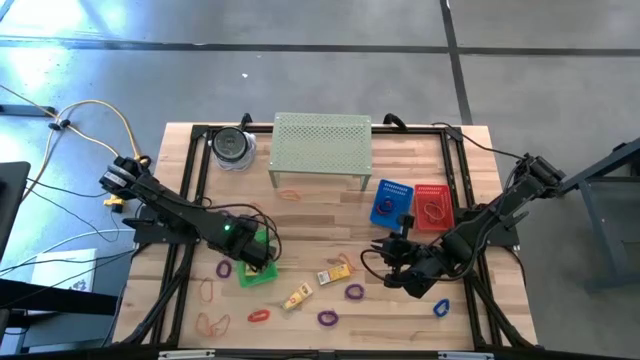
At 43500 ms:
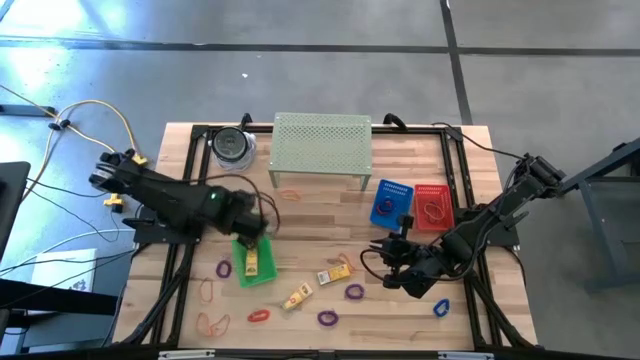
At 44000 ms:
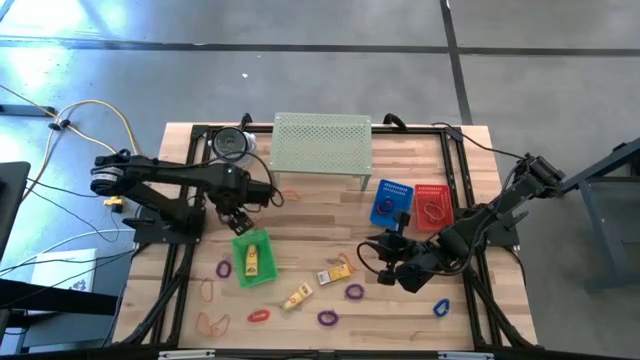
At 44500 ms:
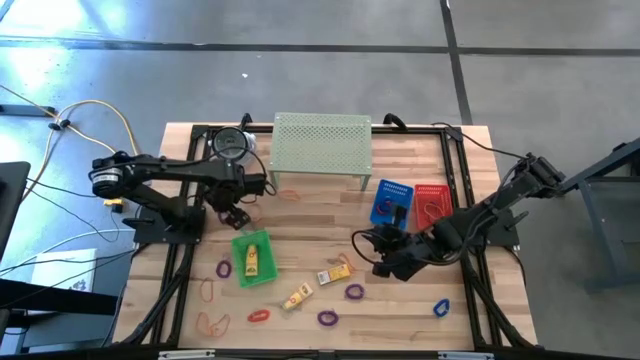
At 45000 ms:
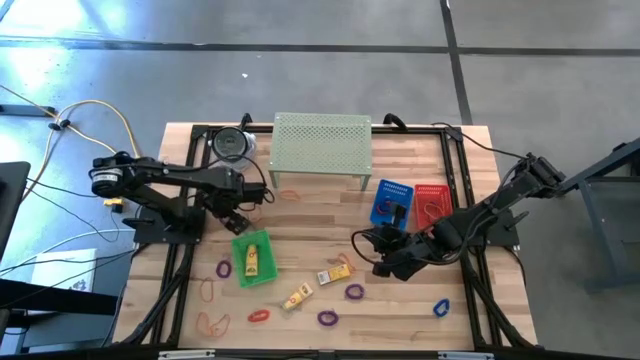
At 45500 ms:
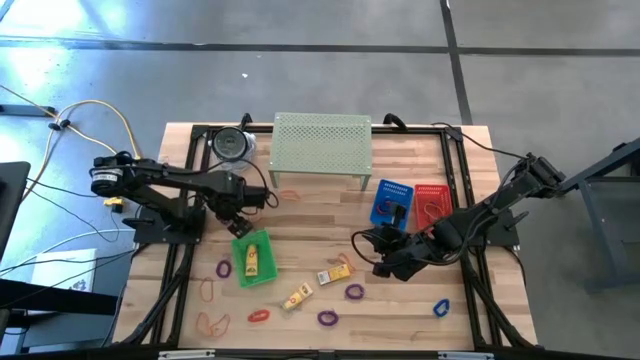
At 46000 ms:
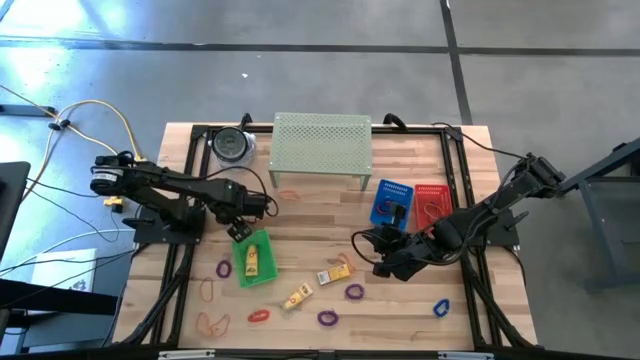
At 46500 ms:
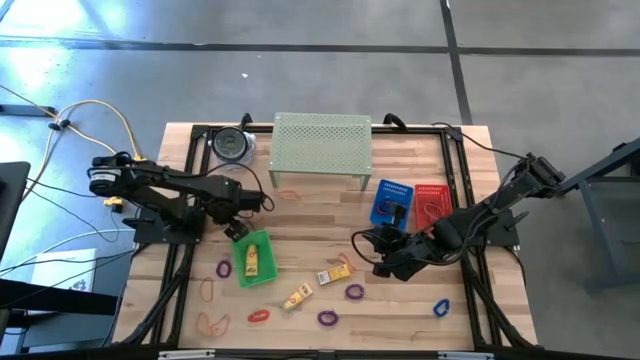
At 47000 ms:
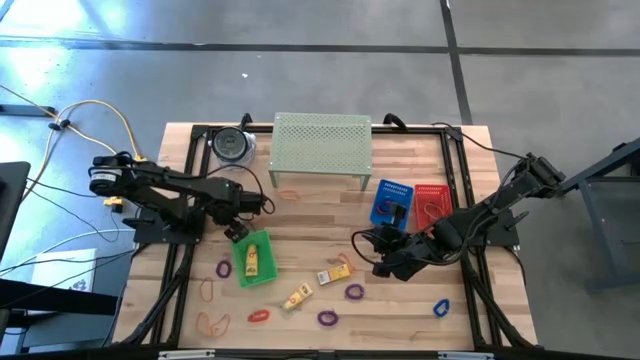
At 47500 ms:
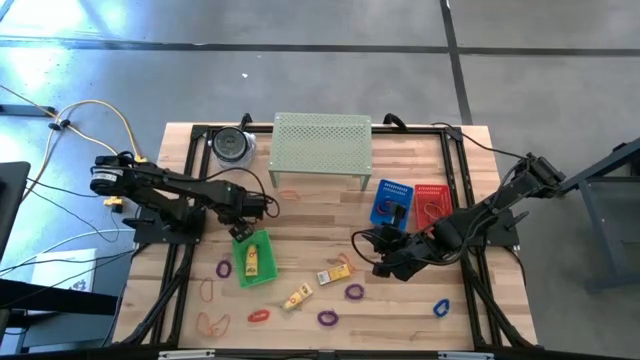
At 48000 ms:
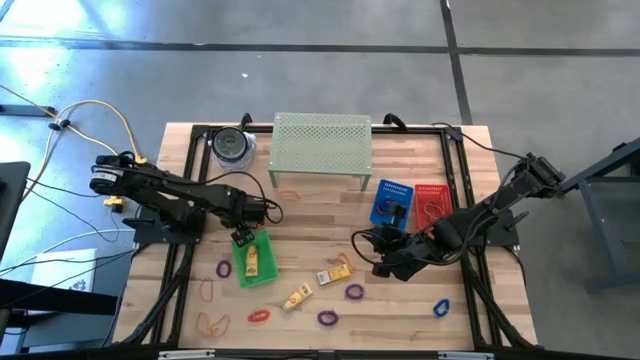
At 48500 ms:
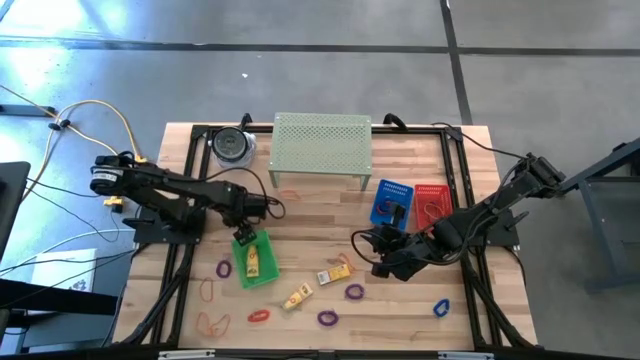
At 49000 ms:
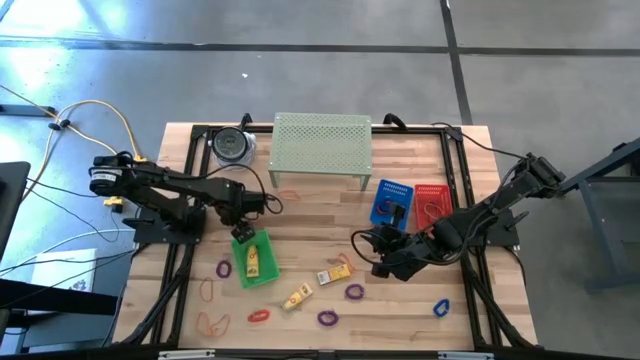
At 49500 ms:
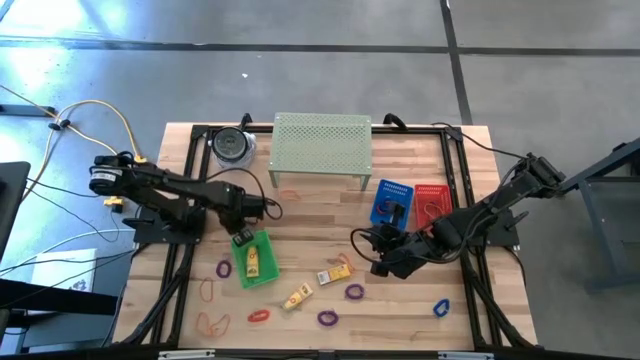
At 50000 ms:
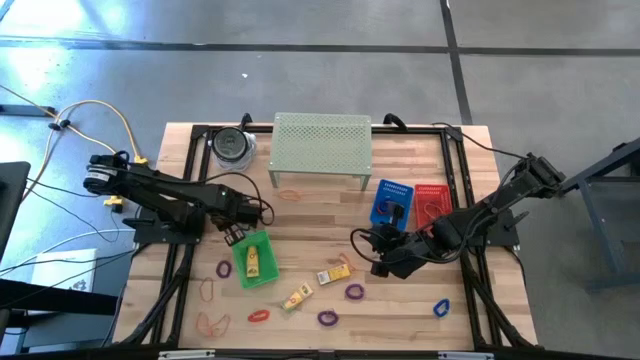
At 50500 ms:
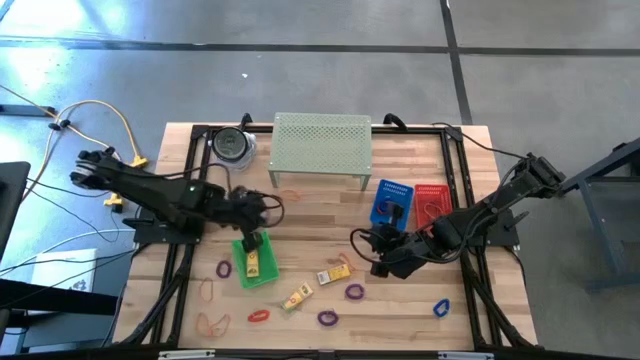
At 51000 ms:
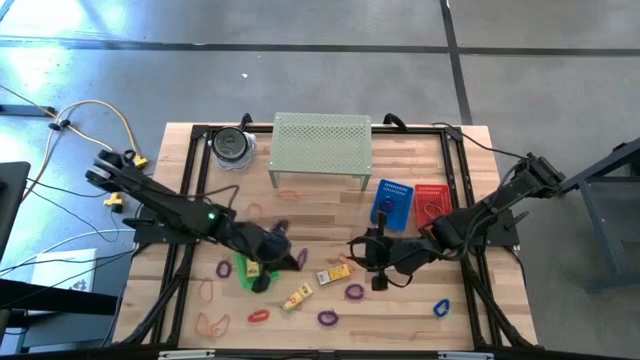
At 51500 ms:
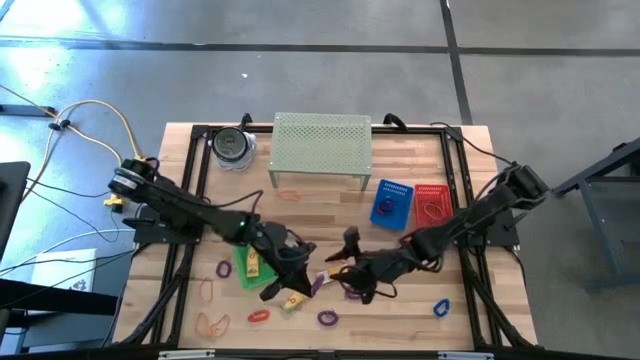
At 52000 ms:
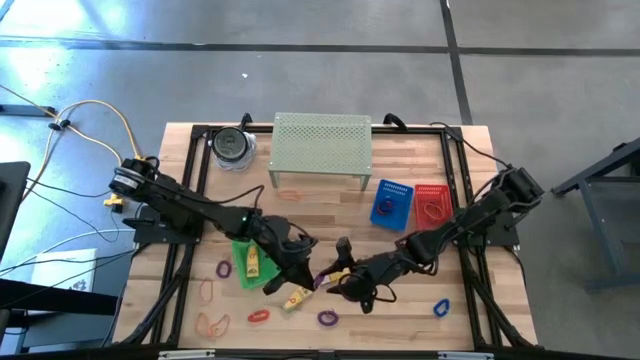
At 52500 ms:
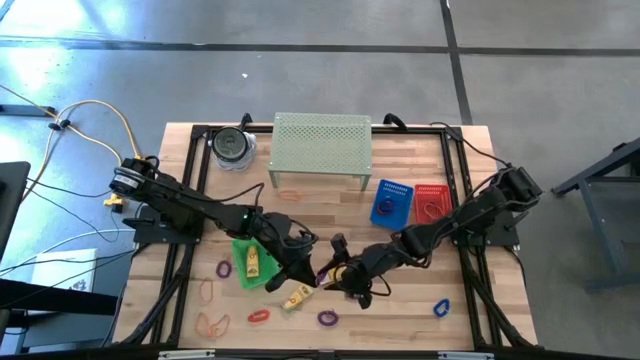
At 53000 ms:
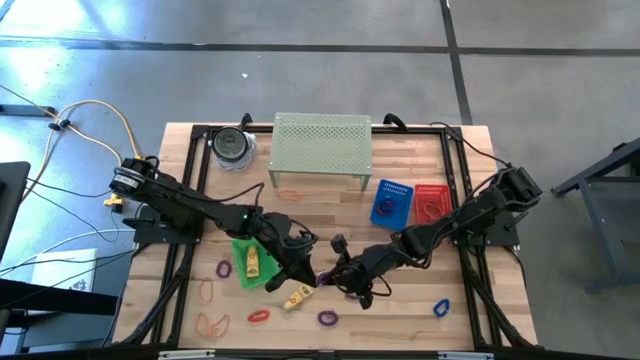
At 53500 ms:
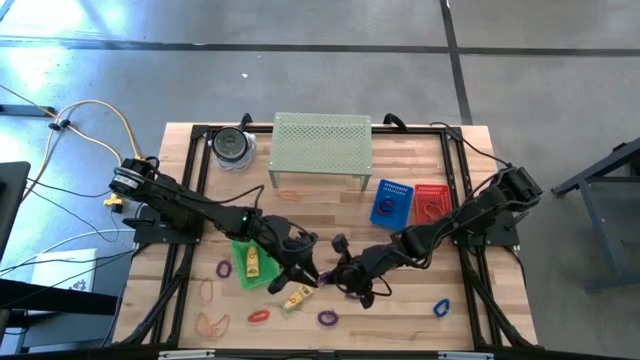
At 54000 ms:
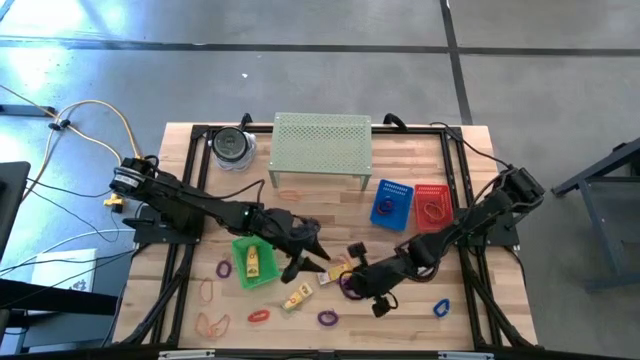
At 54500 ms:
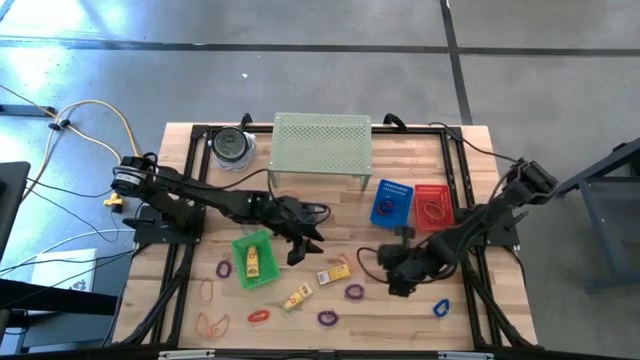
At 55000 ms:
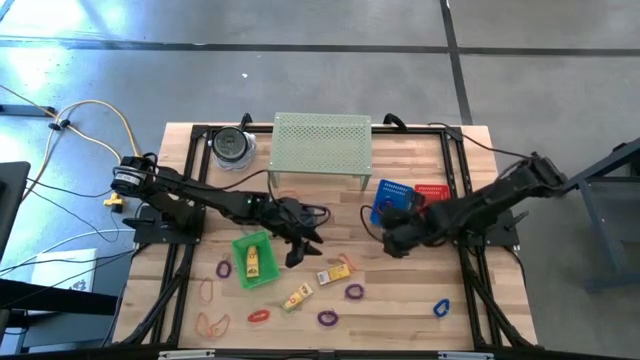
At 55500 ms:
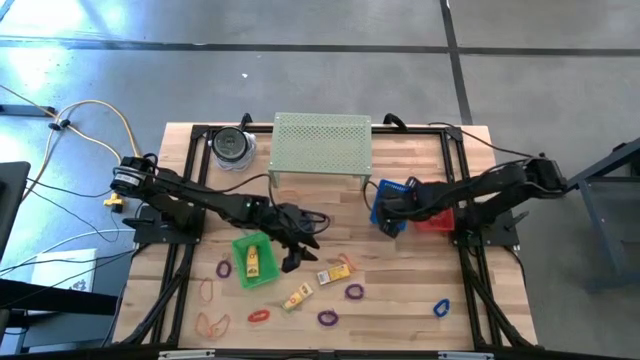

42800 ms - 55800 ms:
Task: Pick & Place Office Desk Supplies
Put the violet spring keychain into the blue bin

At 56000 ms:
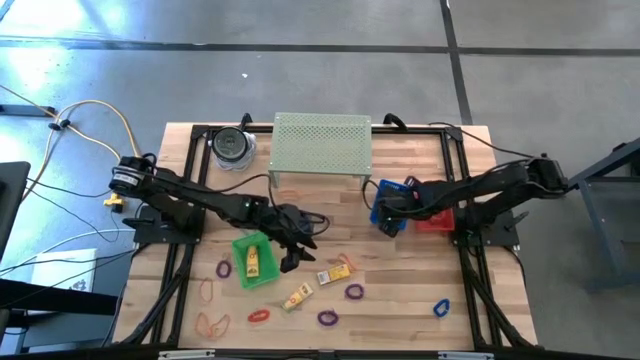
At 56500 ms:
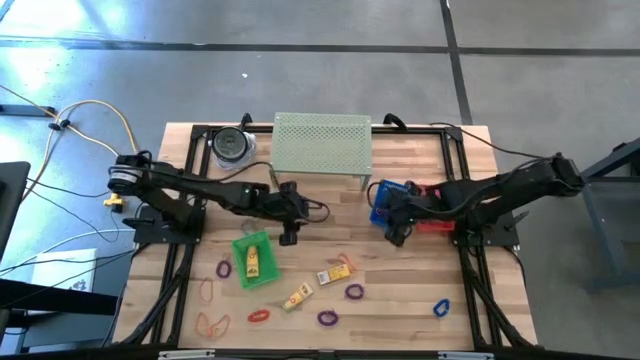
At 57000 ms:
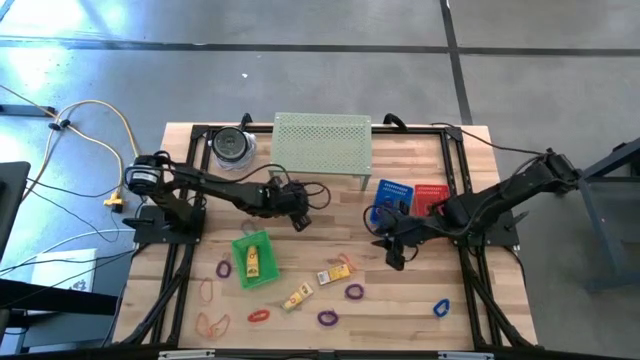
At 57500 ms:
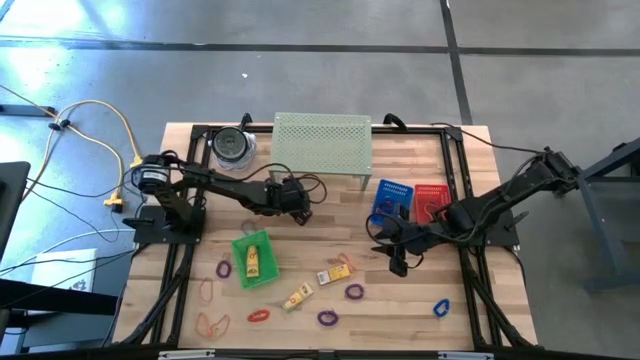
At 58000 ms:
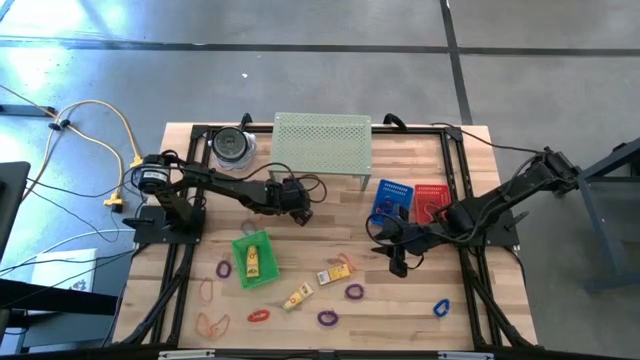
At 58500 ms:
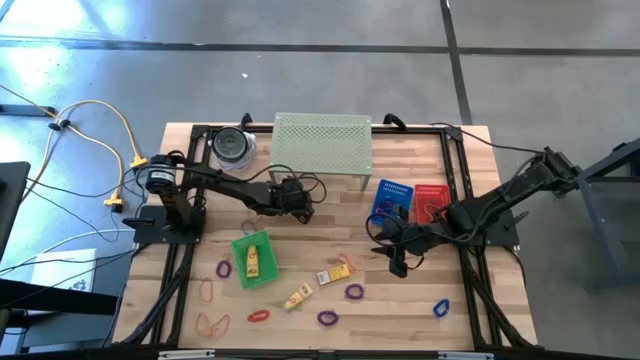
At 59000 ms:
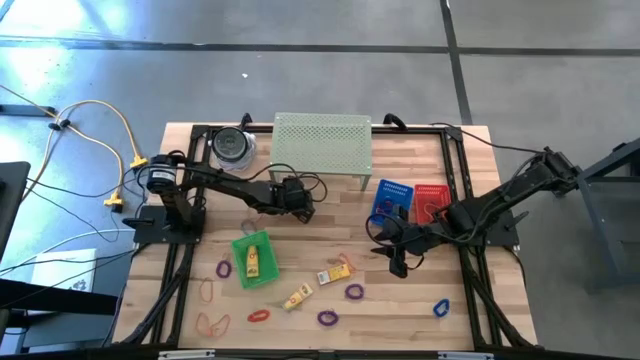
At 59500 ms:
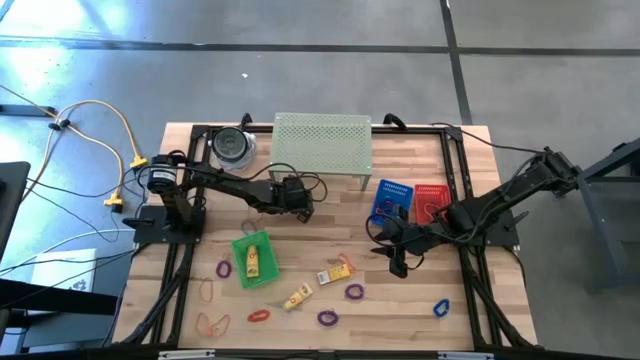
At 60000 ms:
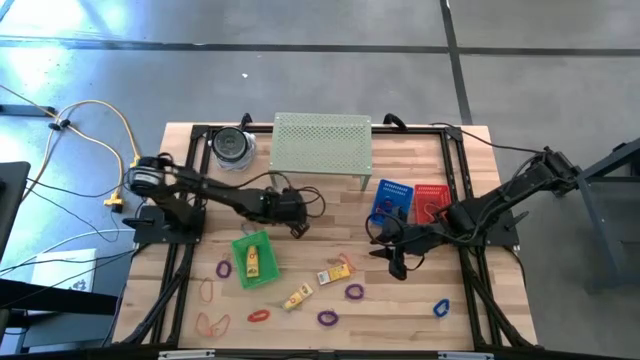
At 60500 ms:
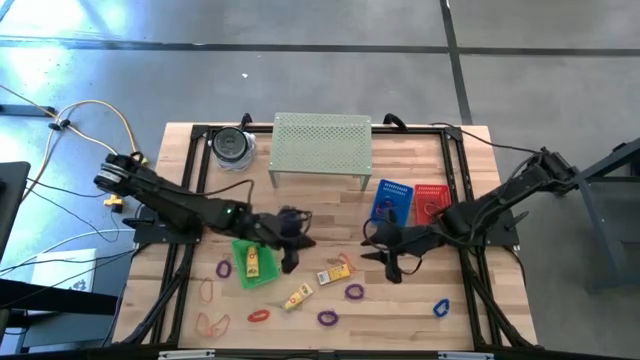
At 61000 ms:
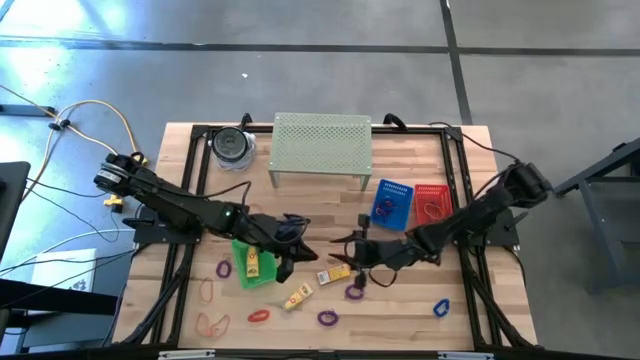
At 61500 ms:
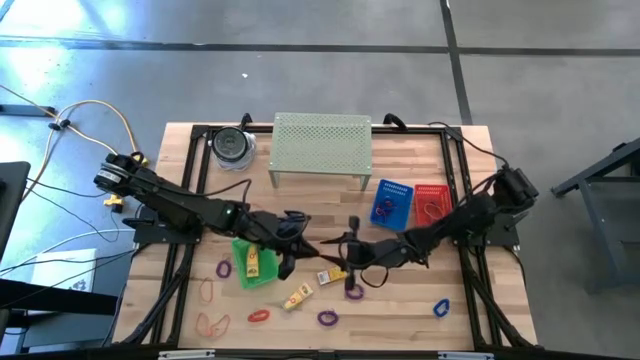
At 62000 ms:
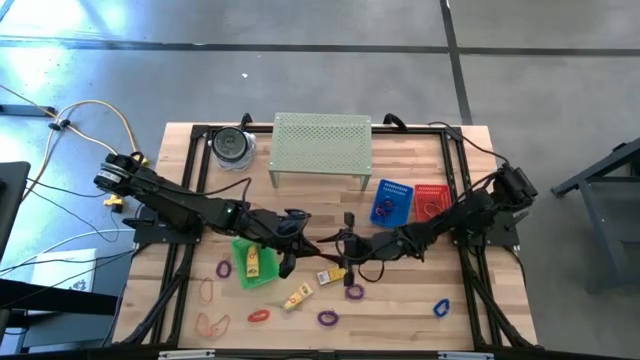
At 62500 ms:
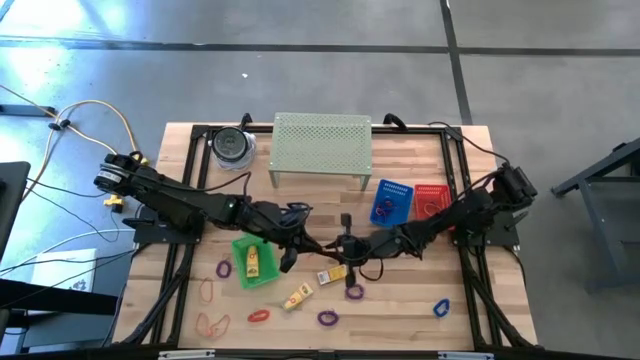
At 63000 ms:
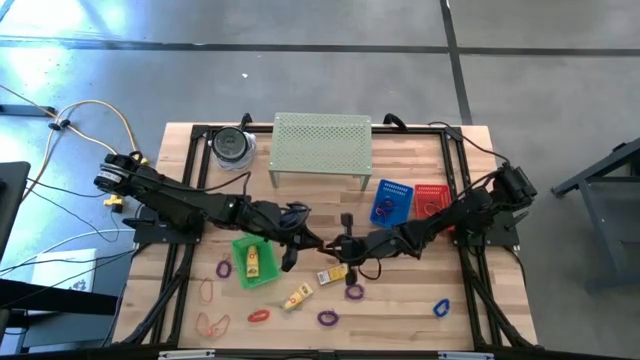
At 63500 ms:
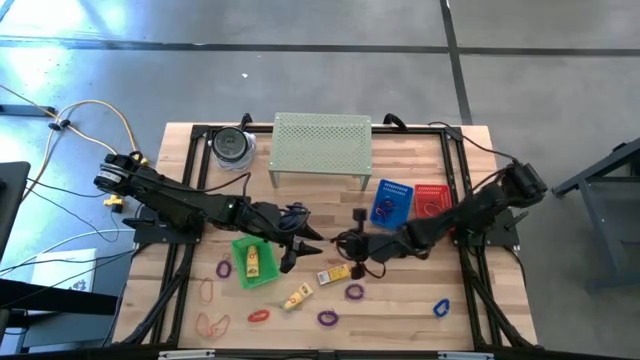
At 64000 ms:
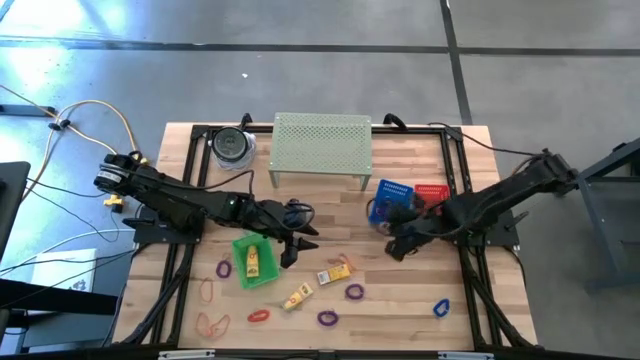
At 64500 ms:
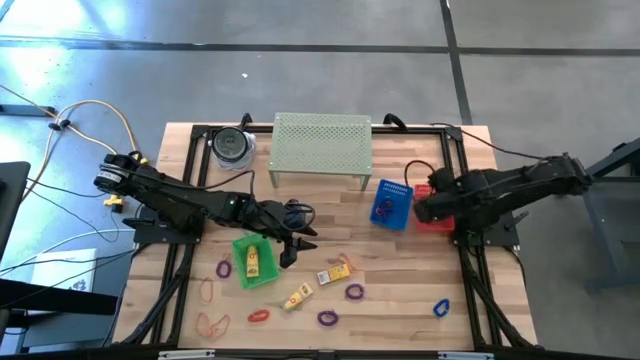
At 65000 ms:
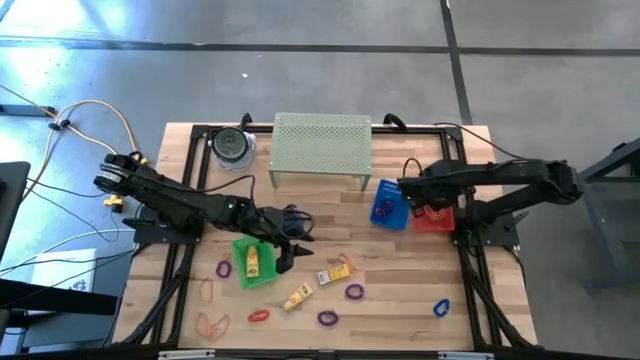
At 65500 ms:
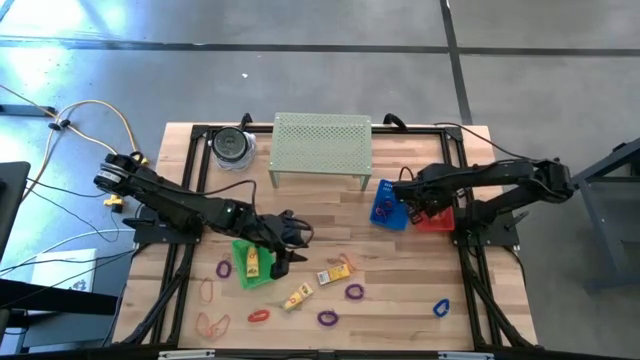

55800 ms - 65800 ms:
Put the orange rubber band into the red bin
